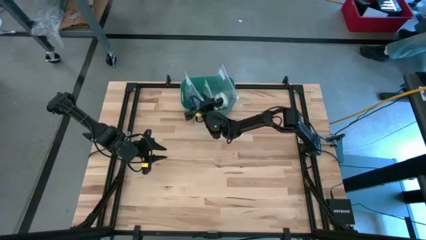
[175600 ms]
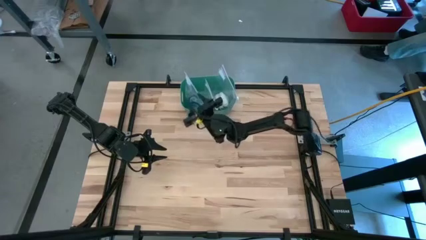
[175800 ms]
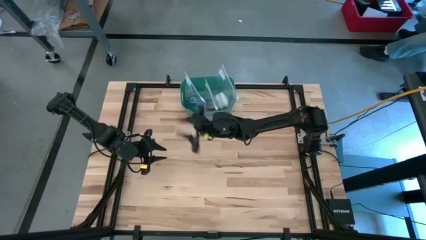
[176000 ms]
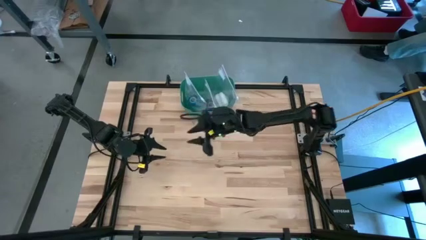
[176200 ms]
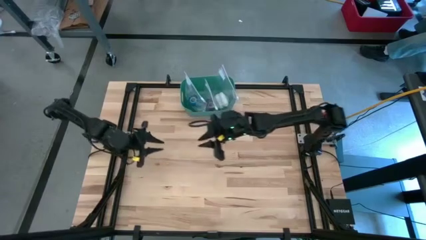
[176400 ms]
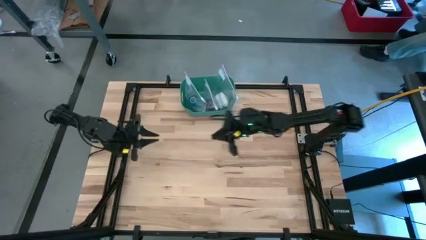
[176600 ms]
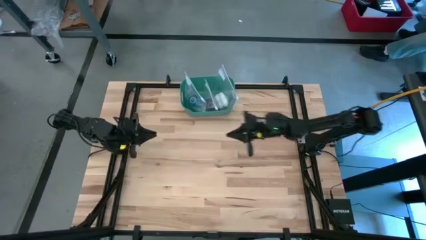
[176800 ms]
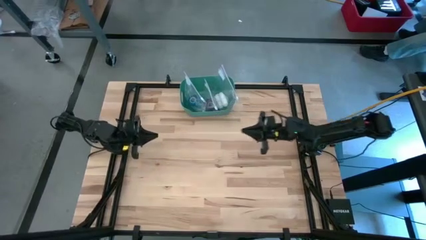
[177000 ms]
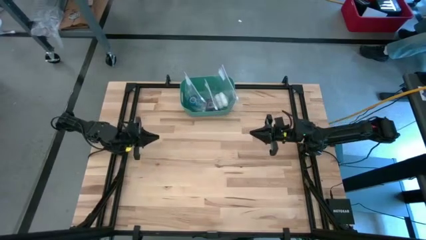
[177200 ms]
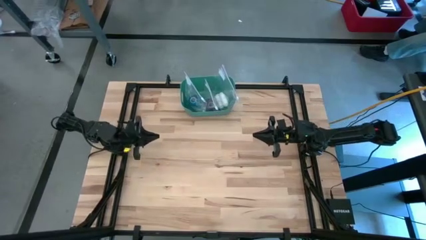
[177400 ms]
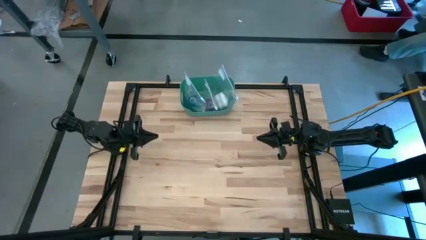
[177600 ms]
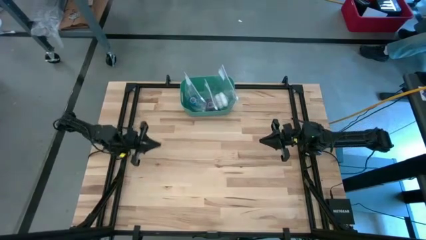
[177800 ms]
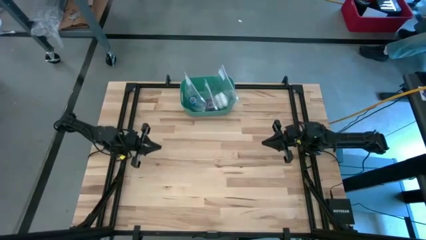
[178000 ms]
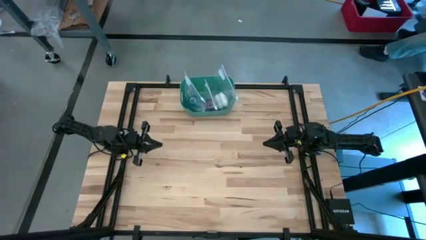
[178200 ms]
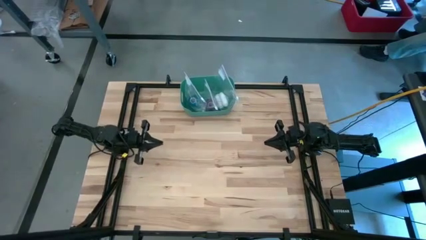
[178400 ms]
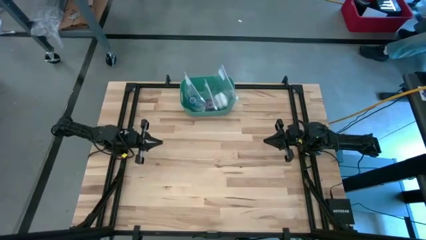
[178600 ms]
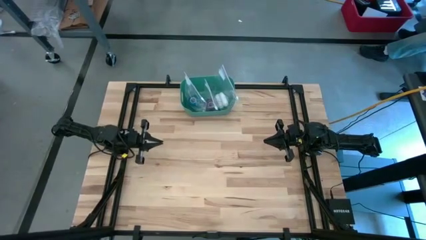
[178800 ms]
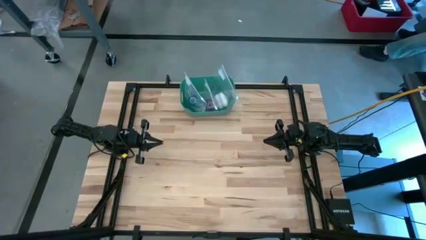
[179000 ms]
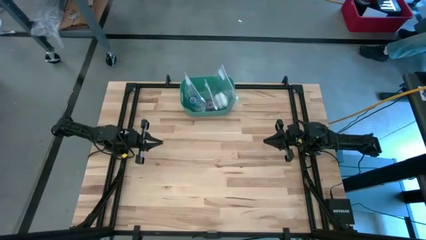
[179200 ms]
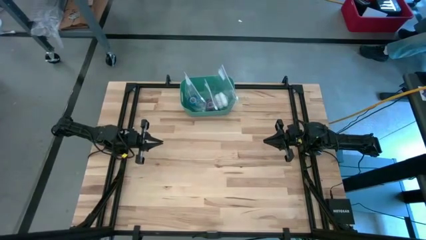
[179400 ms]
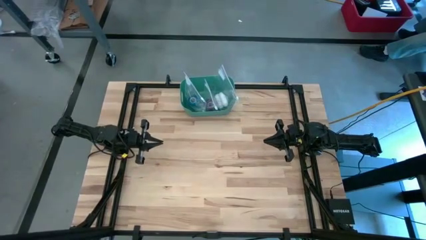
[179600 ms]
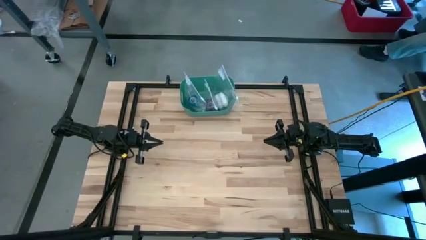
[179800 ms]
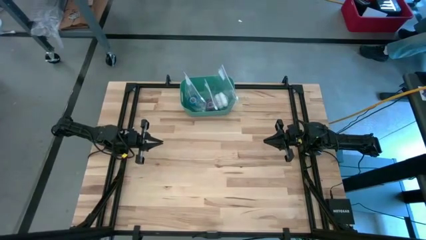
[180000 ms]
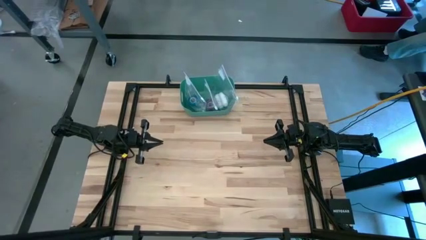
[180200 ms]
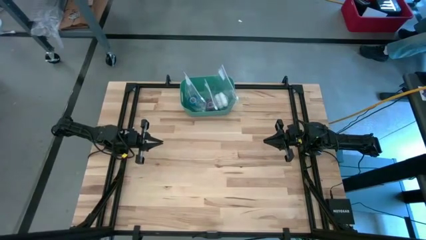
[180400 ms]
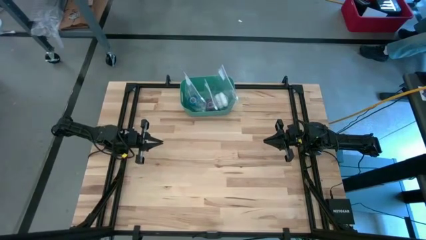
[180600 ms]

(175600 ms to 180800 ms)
Task: Roll bandage
Return to Home Position

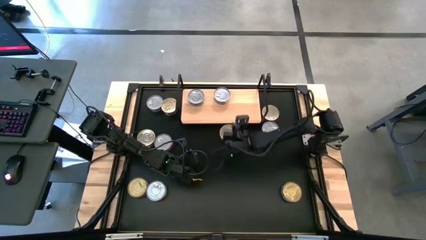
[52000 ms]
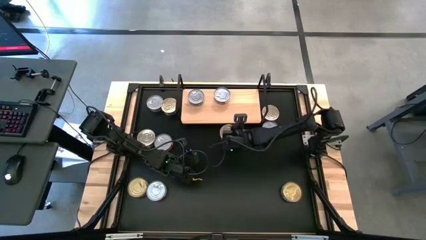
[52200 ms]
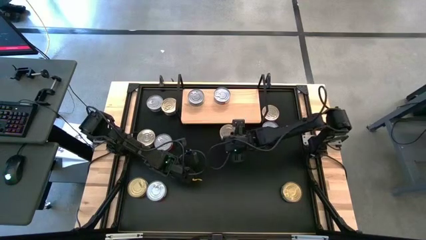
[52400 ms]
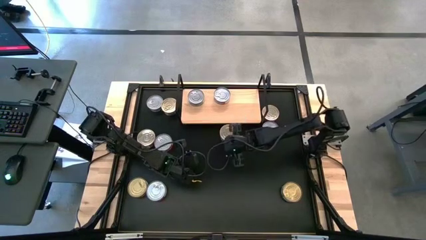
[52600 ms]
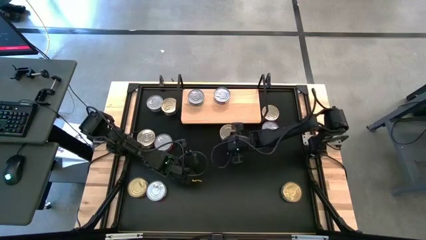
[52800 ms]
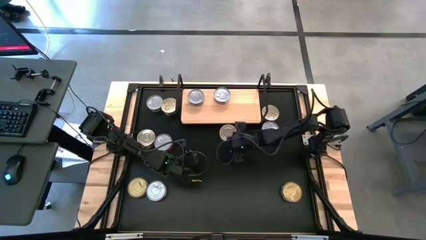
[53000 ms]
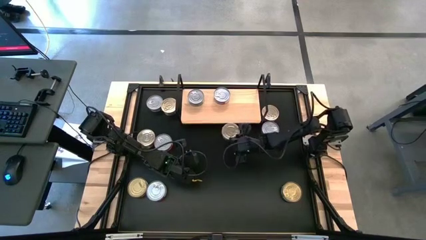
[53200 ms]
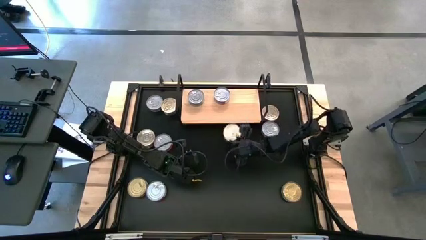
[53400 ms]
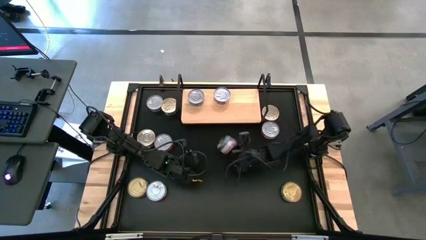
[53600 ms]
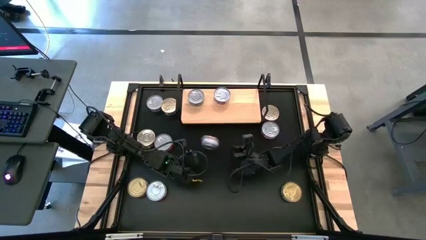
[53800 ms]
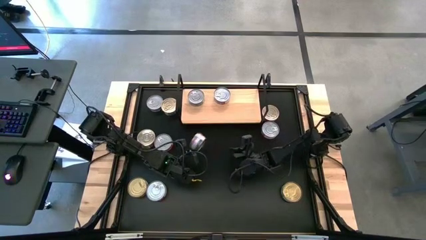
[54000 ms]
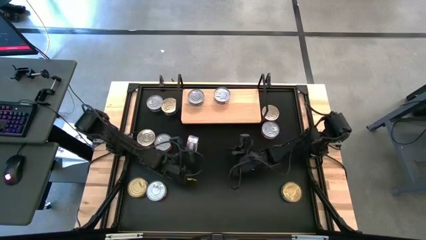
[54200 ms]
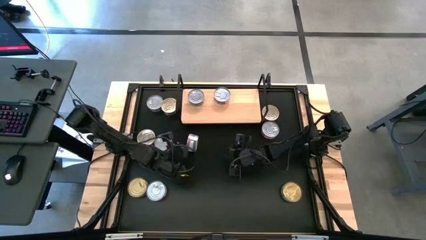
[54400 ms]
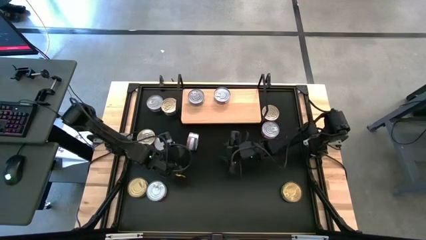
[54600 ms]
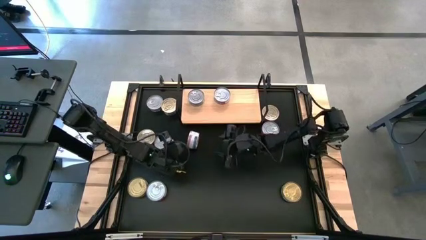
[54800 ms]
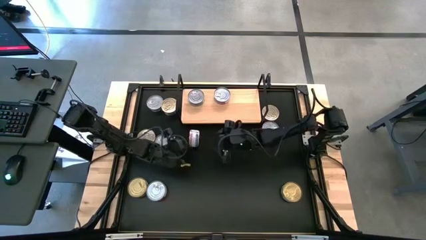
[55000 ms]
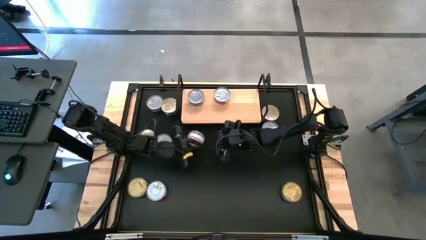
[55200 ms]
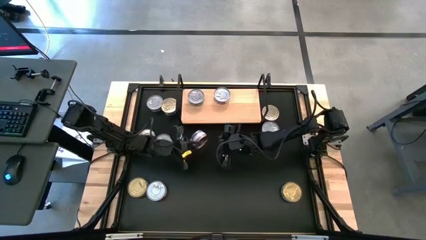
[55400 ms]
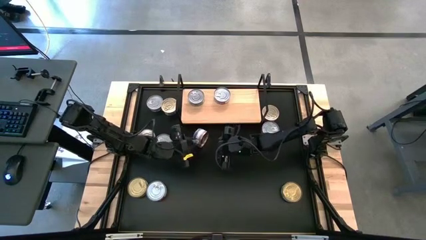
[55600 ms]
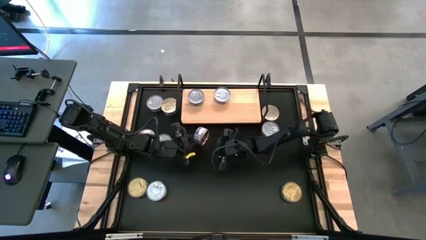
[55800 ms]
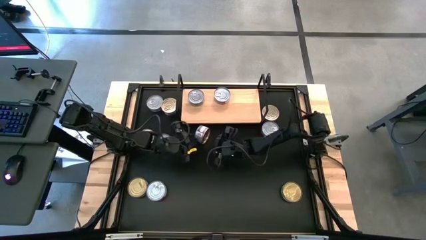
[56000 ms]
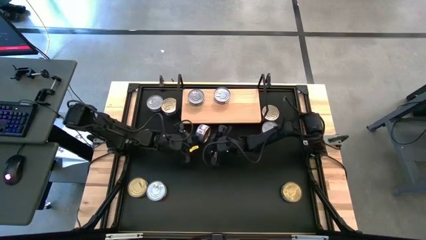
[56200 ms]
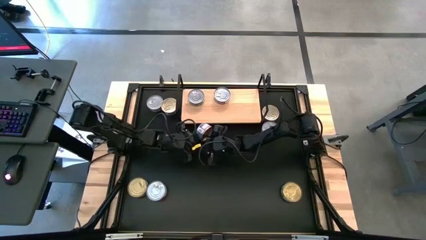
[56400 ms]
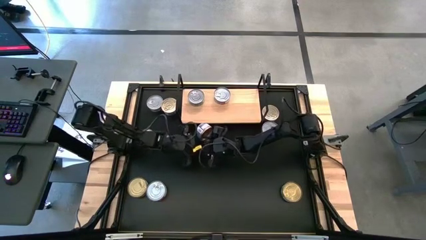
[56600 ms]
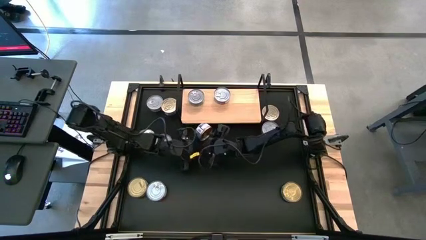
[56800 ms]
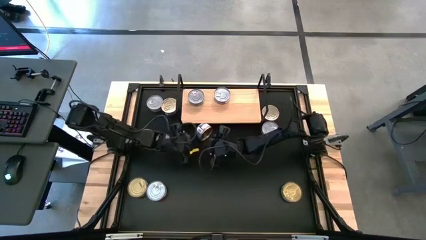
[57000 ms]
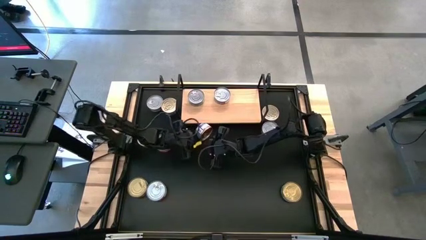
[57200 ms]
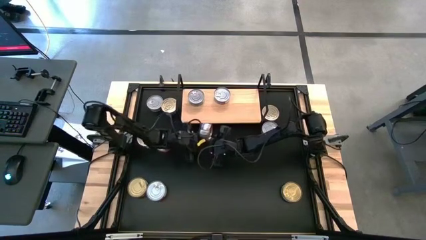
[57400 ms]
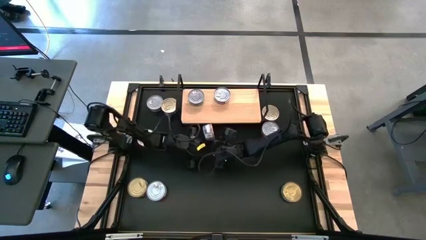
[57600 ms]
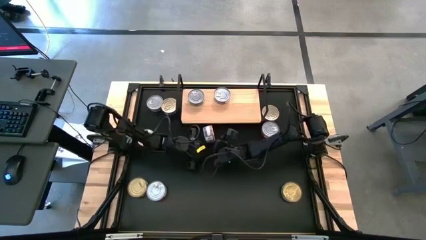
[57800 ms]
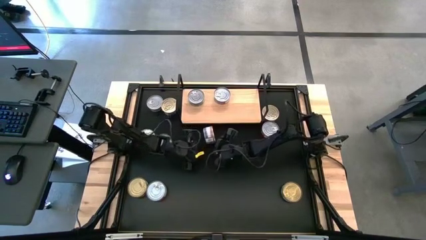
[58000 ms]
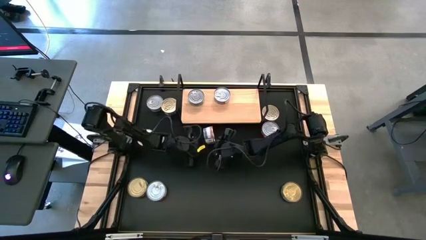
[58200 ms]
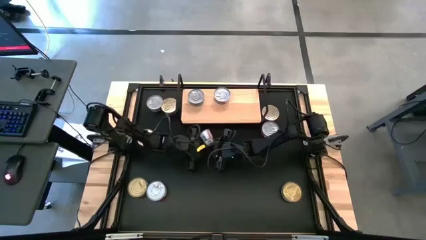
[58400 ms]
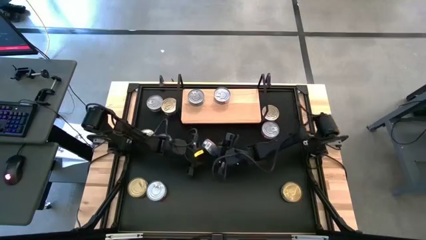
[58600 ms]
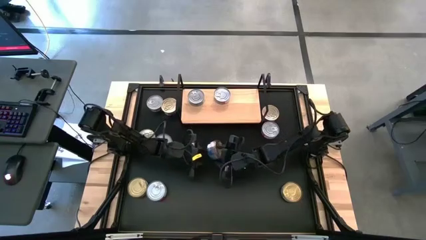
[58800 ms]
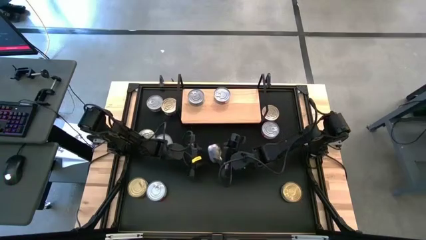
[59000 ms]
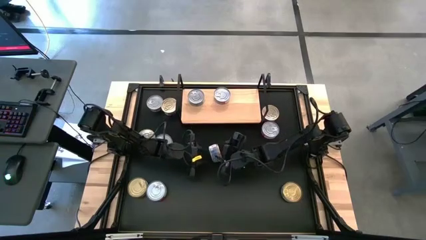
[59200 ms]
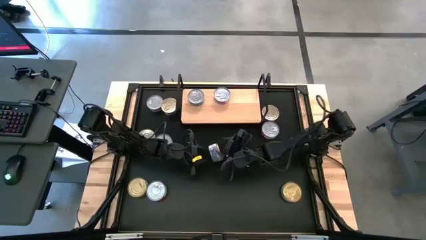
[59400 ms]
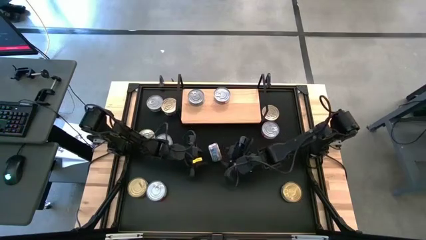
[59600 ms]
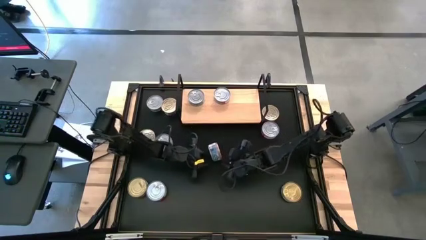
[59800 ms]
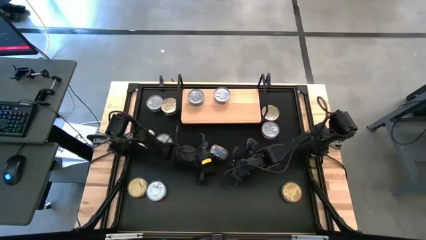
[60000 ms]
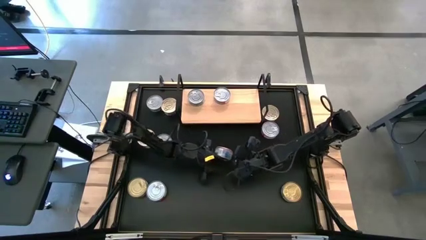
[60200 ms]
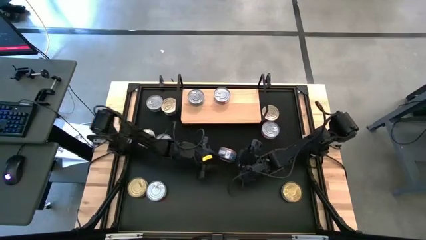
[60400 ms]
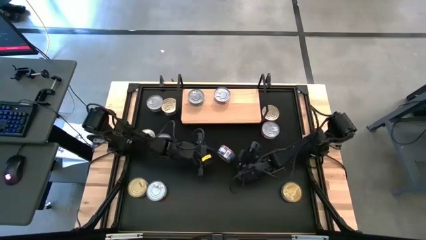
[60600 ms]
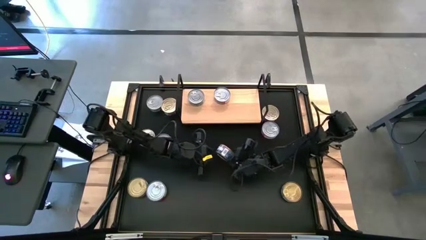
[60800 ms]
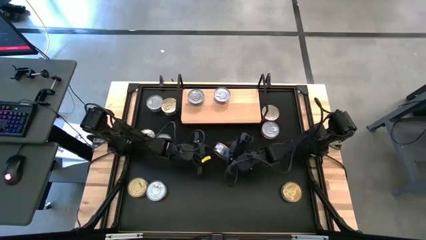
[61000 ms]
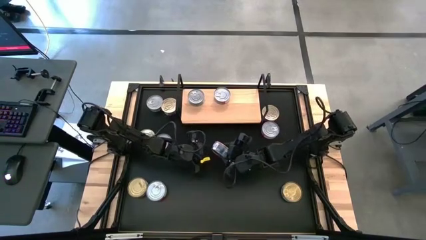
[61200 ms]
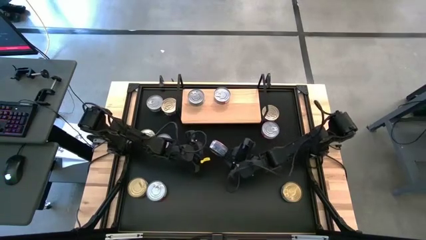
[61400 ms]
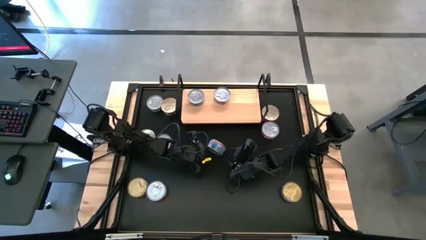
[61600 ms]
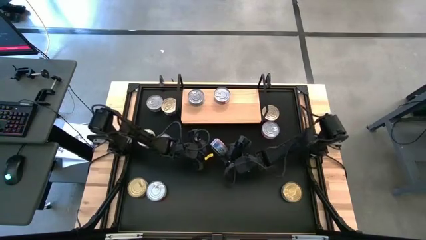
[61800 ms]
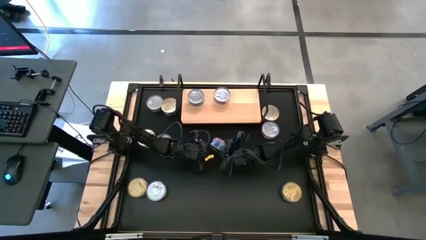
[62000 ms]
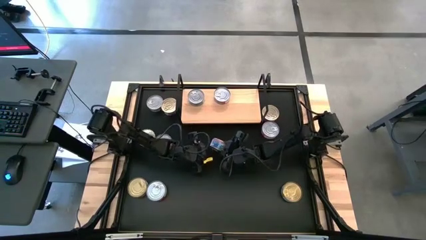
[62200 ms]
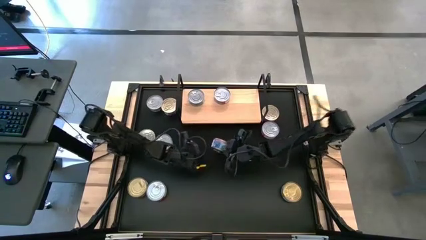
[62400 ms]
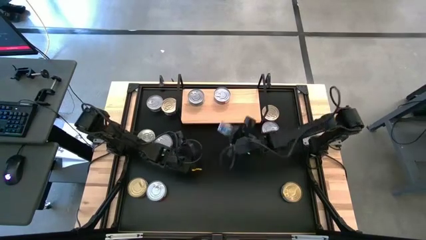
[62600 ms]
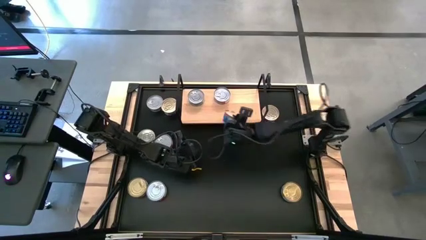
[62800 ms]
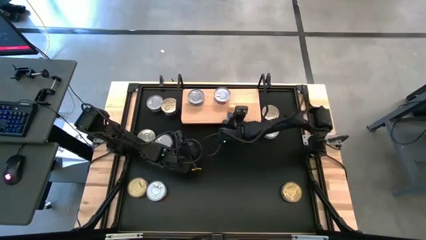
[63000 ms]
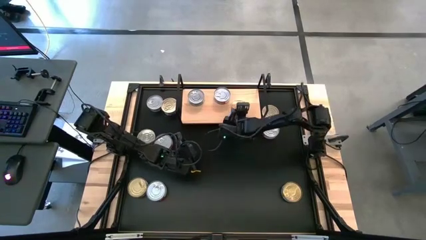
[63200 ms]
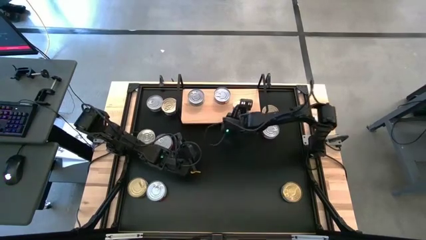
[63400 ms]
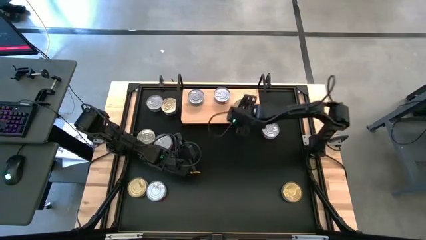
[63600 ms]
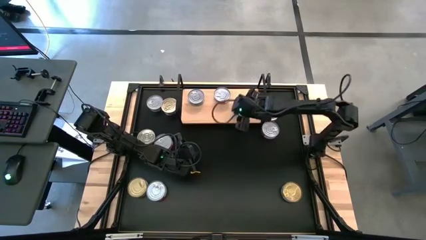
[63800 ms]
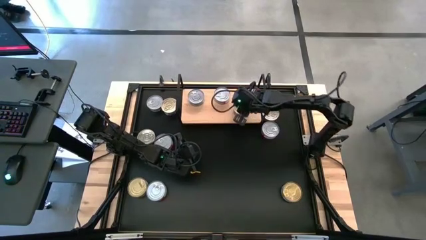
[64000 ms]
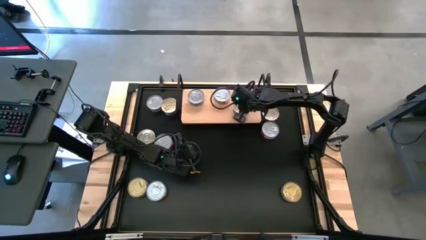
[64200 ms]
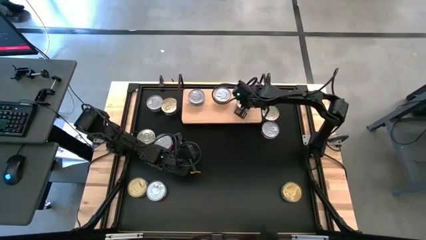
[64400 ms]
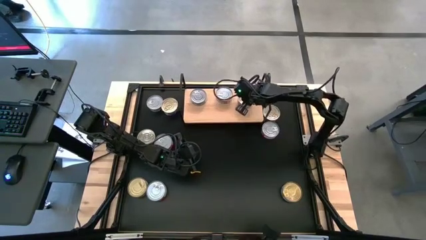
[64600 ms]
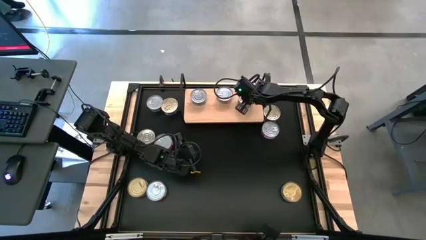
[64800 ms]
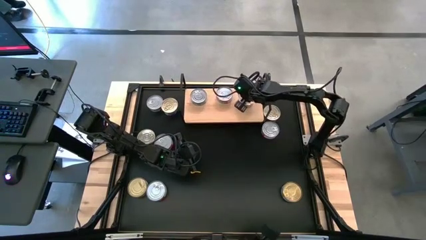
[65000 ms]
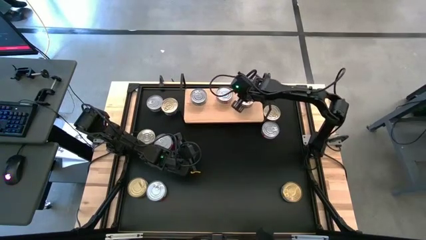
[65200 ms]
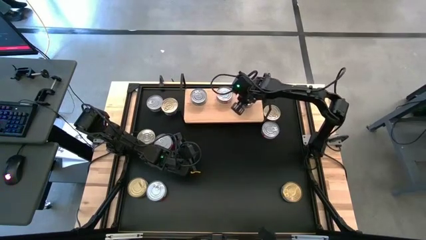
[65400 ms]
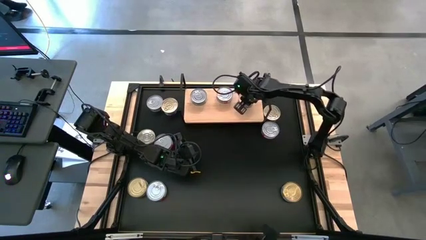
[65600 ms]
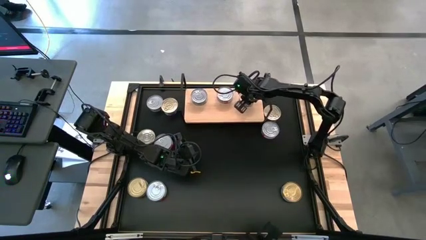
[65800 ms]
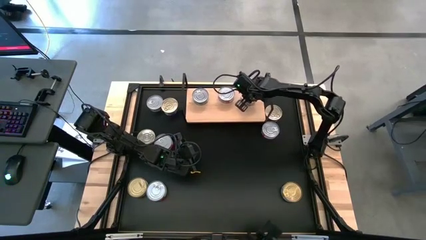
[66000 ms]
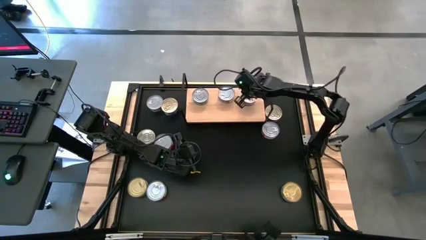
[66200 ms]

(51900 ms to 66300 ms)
Task: Stack canned seafood by type on shelf
Put the blue tuna can on the shelf
